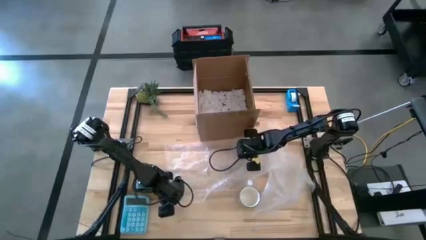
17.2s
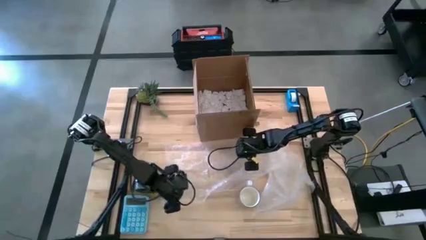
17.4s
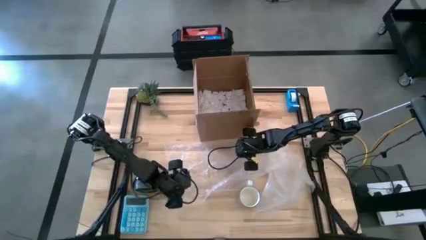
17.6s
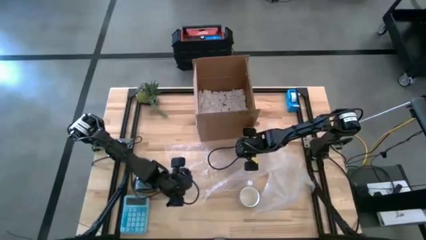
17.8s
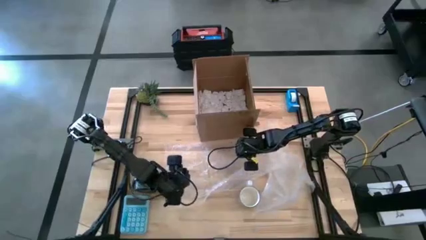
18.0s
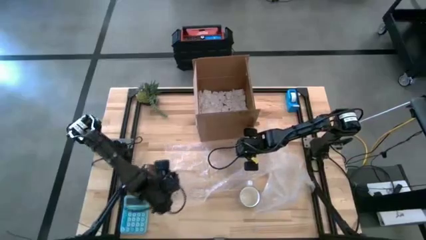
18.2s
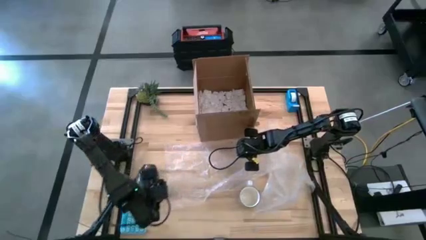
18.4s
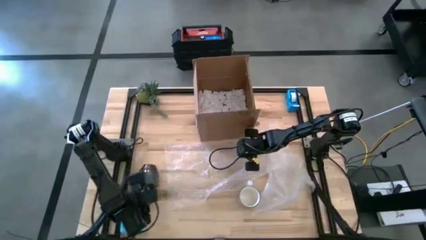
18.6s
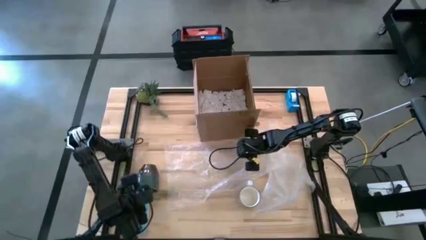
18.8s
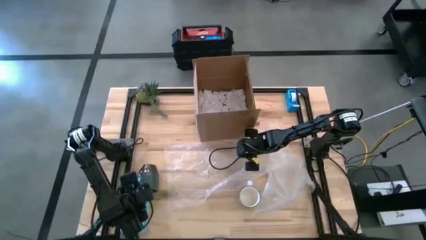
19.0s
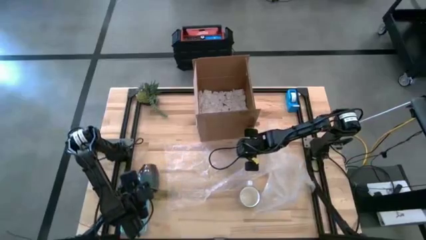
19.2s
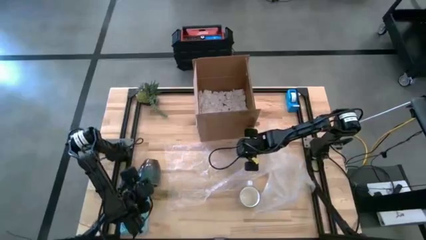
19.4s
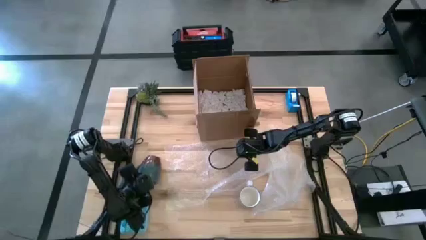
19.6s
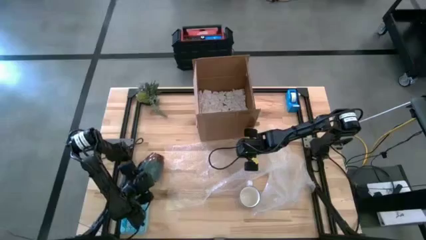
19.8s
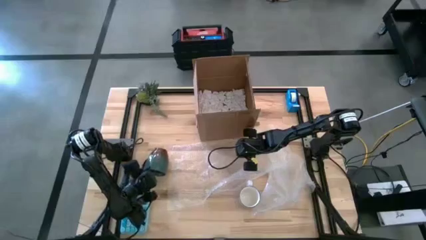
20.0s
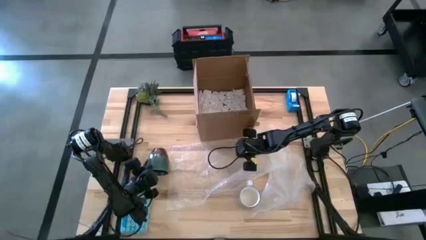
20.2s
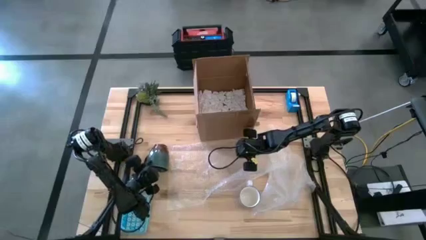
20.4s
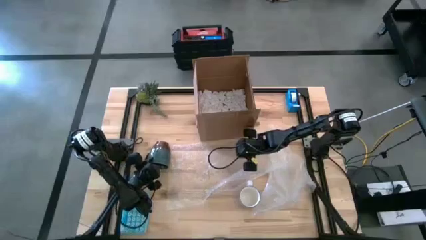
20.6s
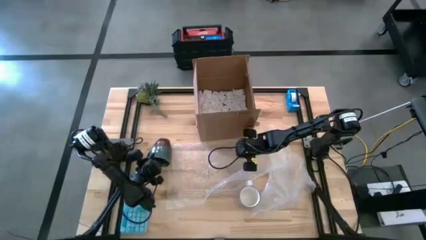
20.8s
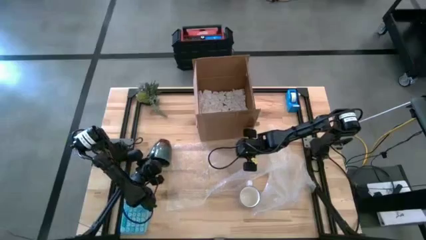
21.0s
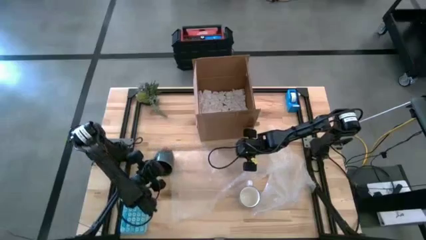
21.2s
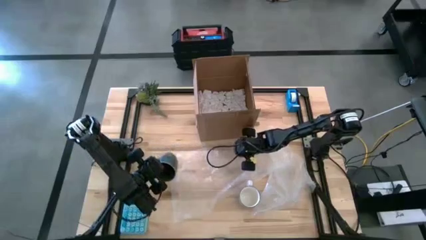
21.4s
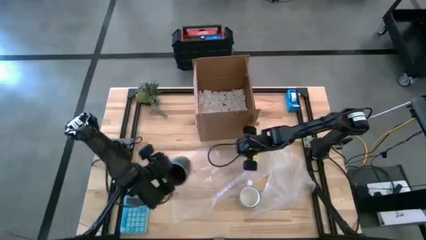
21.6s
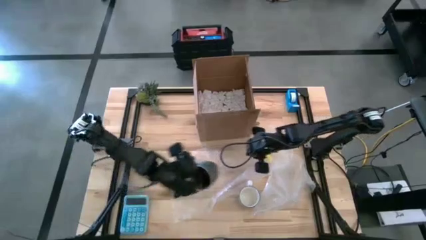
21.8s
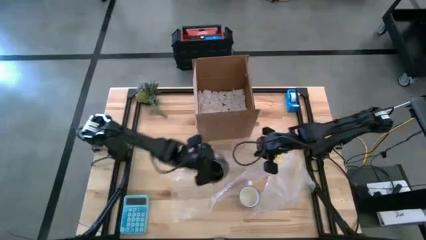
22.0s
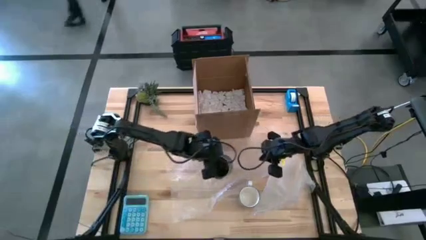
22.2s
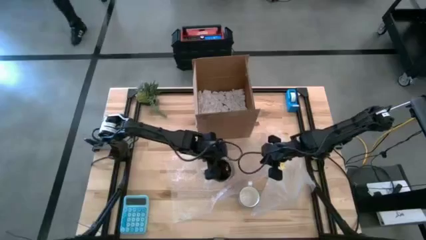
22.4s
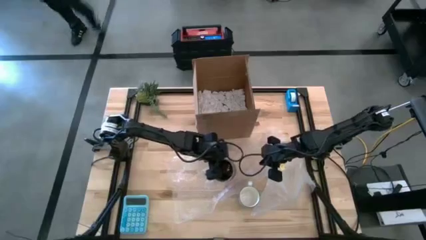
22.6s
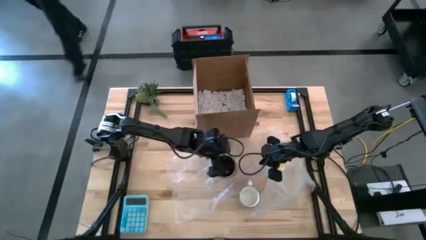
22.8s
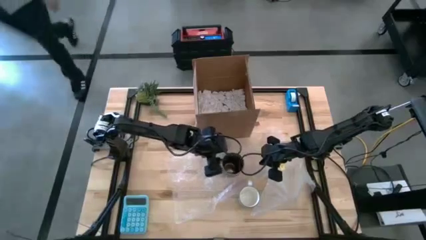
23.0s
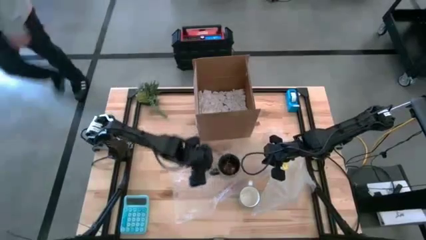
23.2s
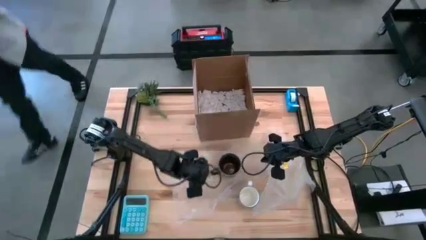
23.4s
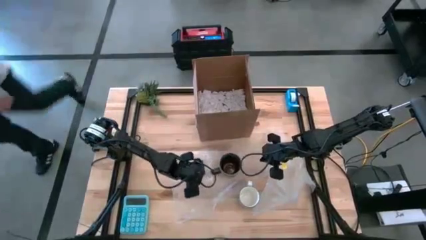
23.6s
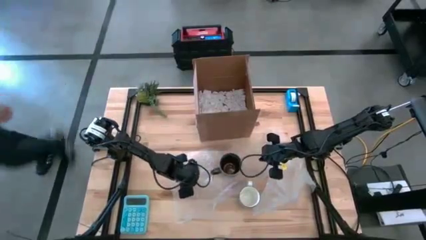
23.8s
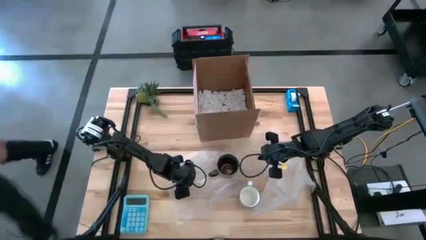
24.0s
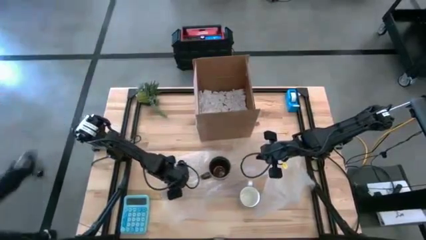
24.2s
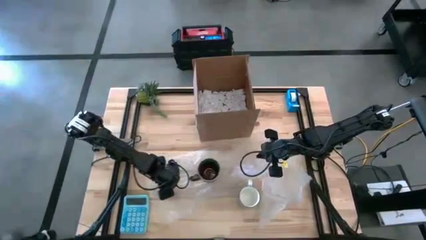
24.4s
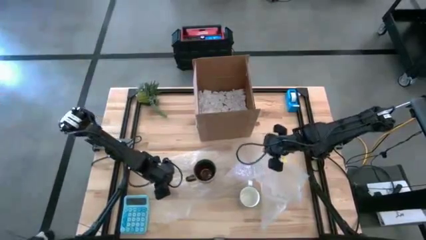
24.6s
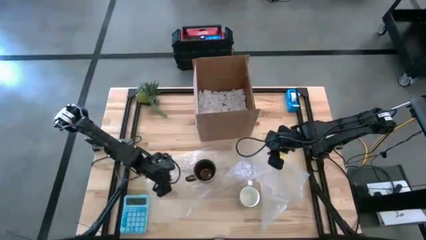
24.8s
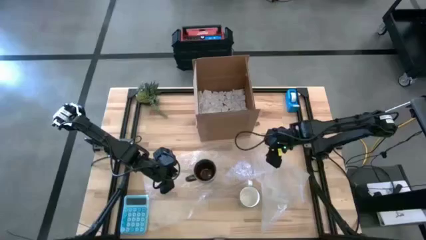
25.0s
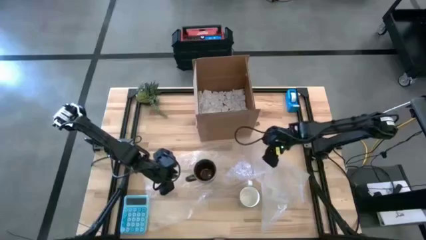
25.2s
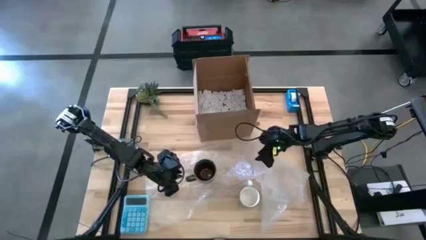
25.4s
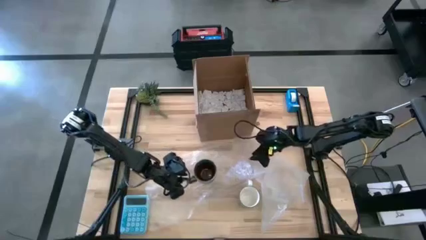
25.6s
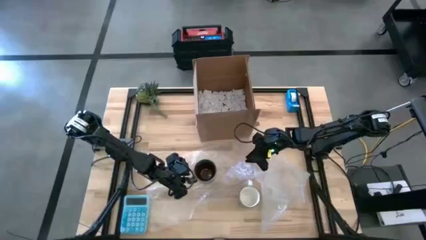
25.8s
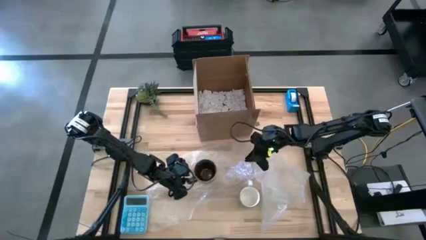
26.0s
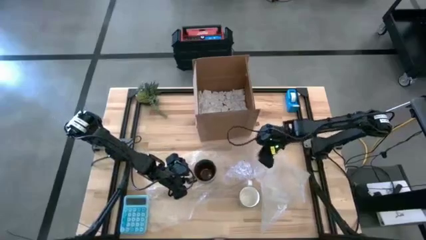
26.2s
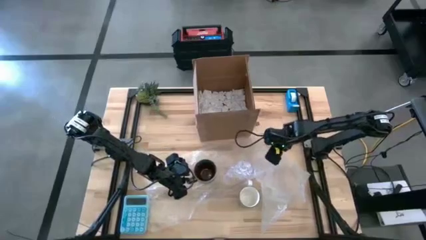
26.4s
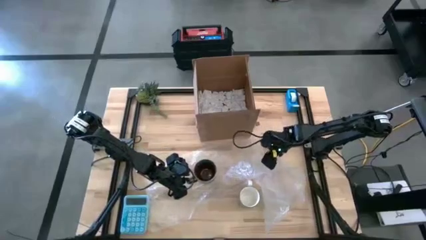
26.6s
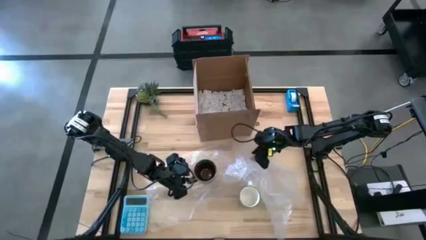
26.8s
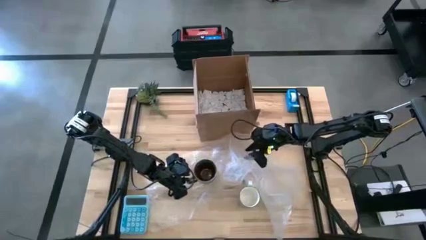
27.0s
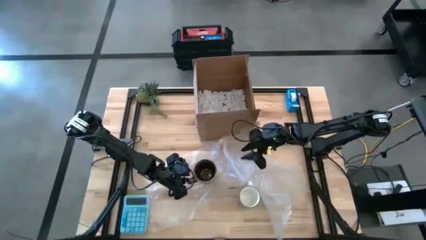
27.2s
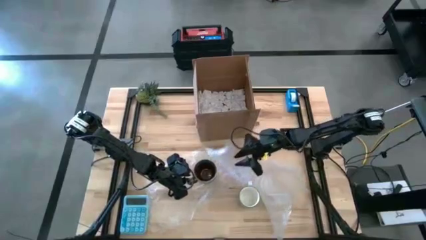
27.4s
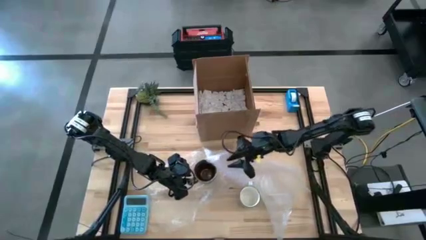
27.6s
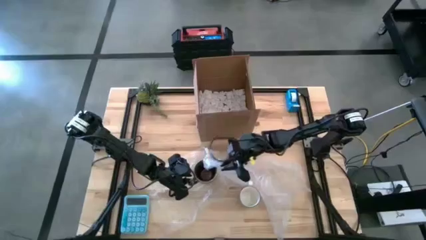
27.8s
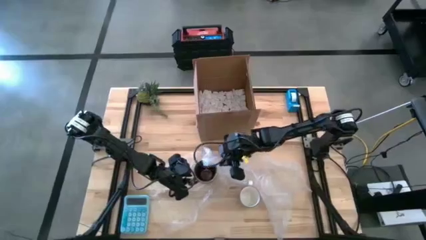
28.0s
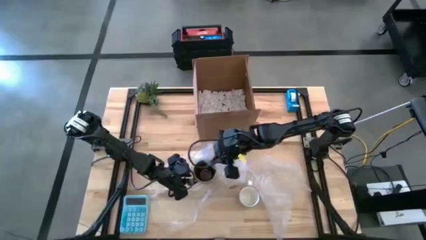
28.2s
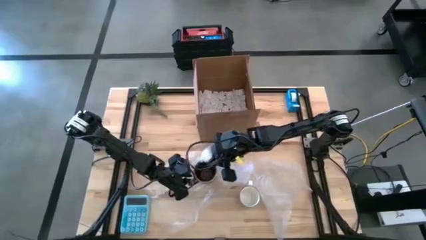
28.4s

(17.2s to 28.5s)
Task: wrap mug
Wrap the green mug with the bubble wrap
